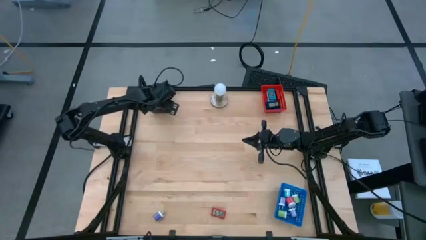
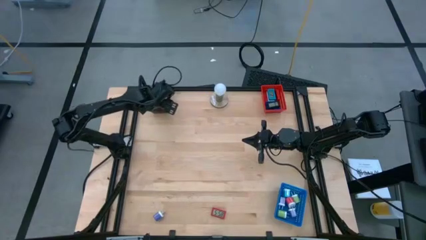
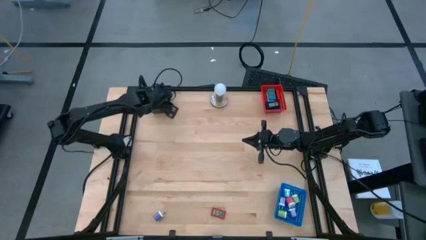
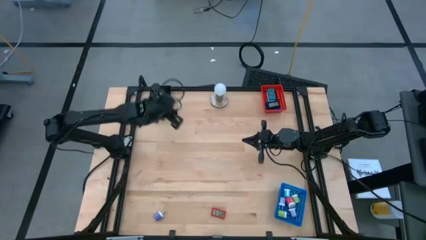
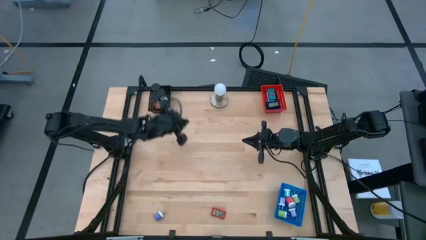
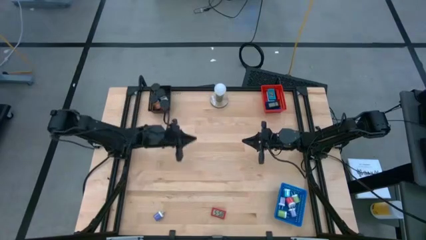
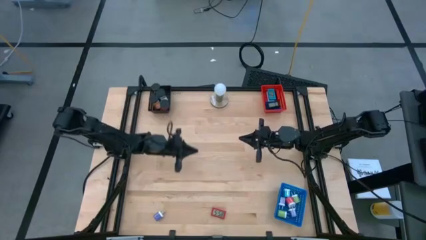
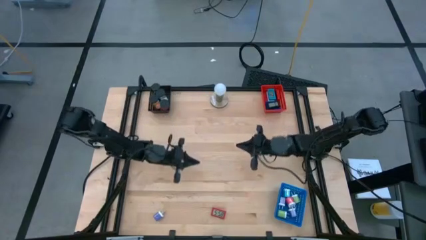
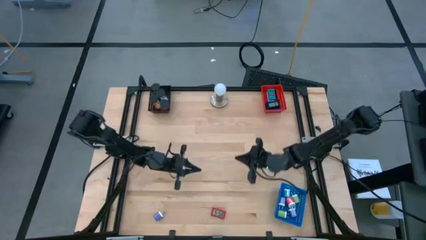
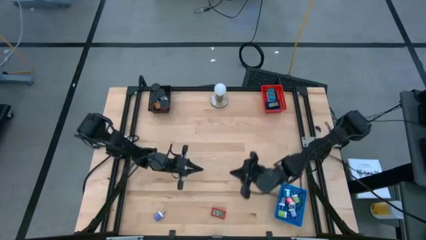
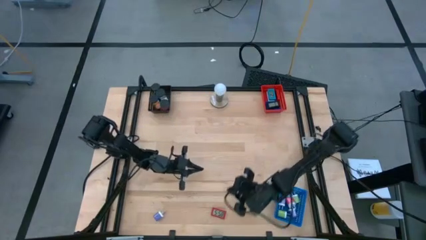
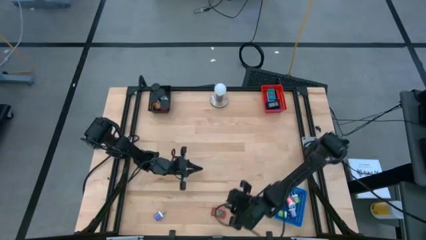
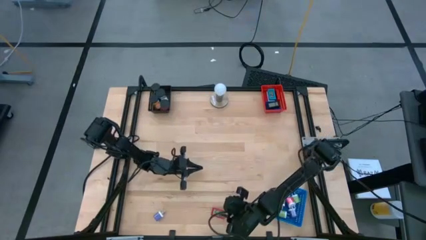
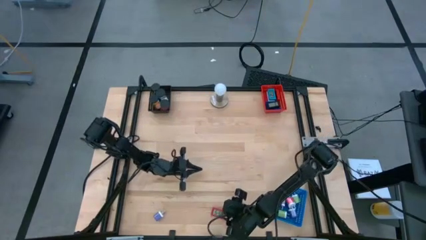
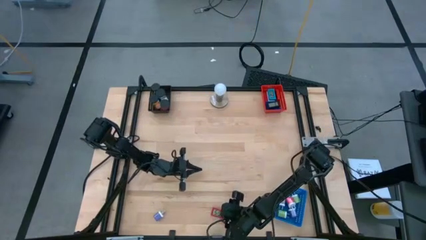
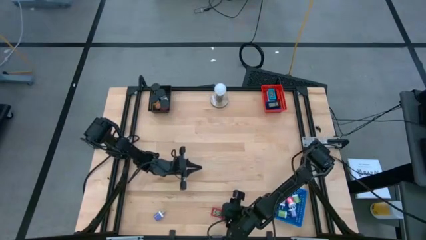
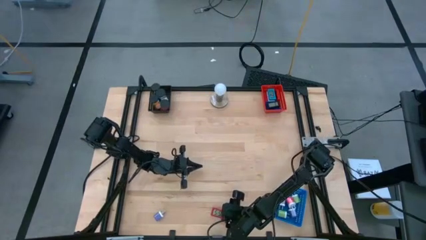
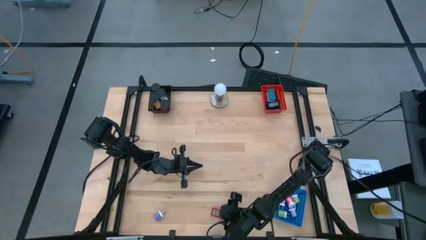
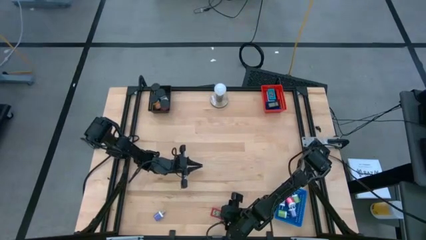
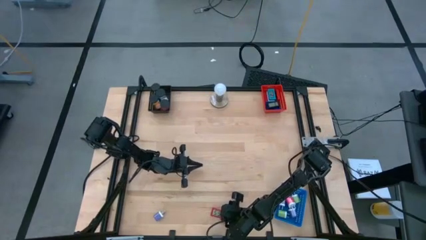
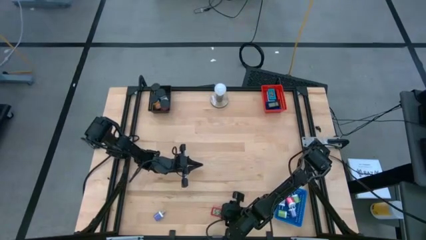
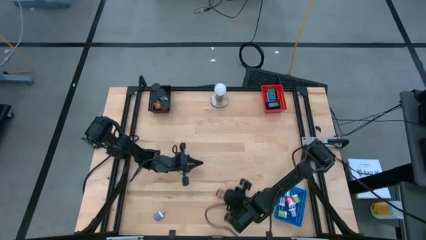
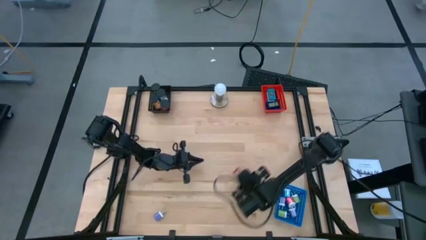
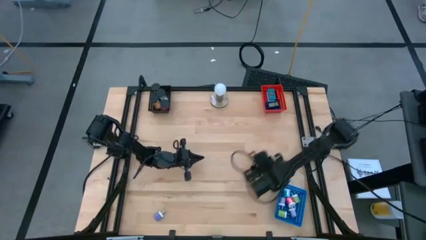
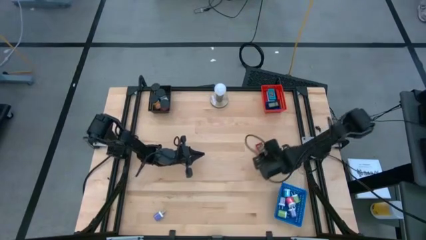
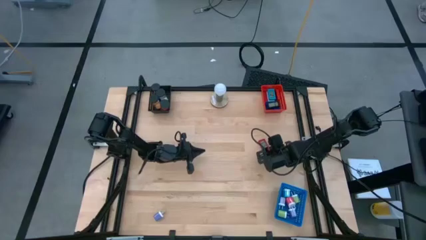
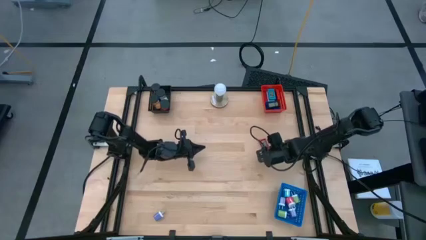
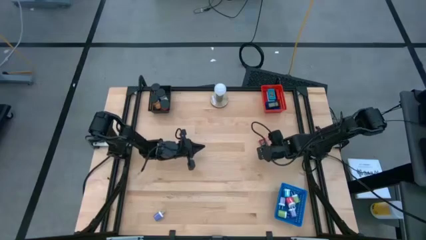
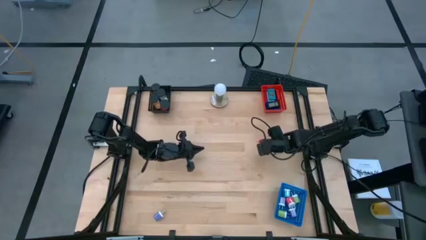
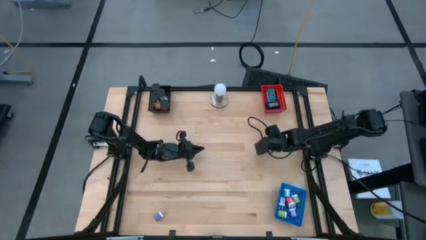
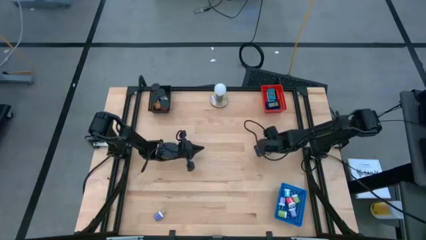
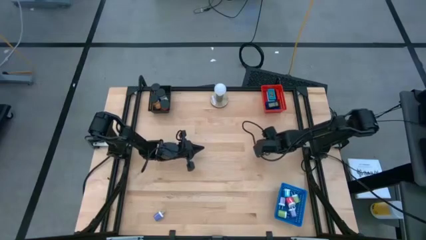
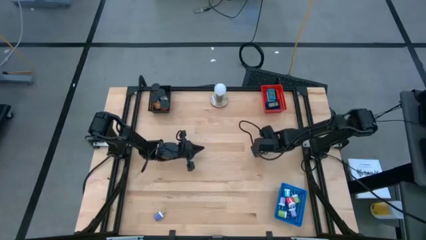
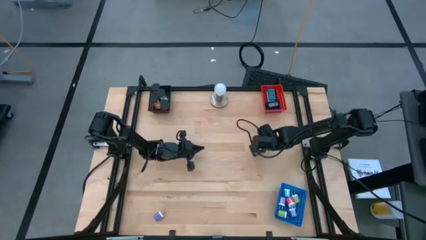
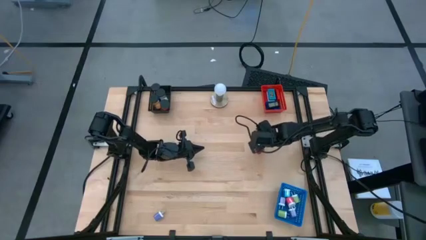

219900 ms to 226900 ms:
Task: Pick & Place Office items
Put the red digital clock into the red bin

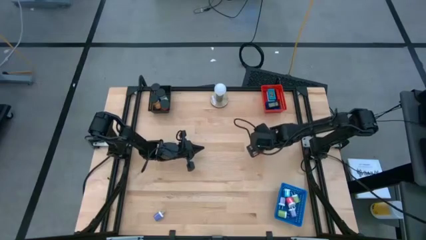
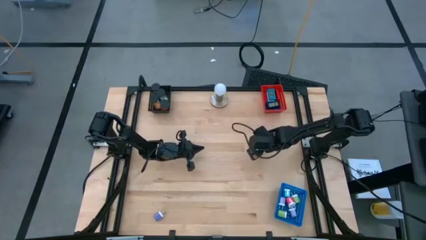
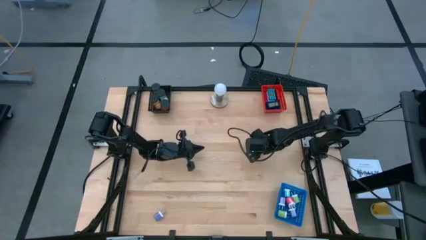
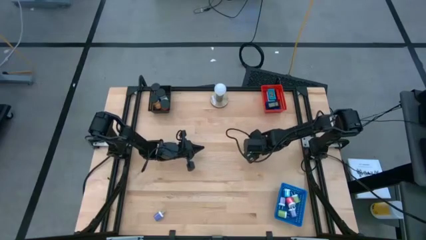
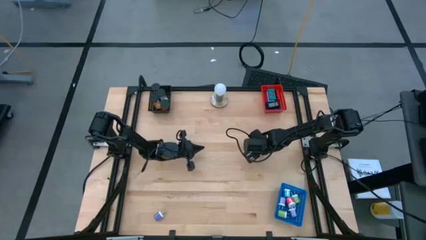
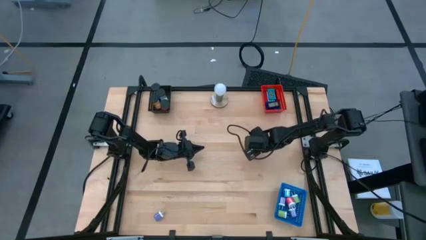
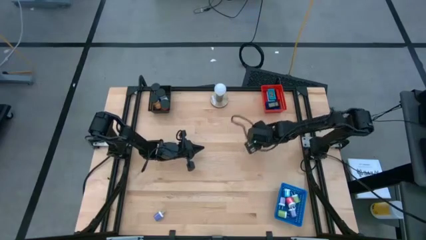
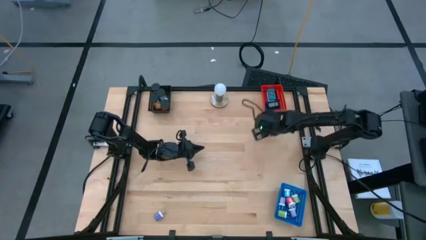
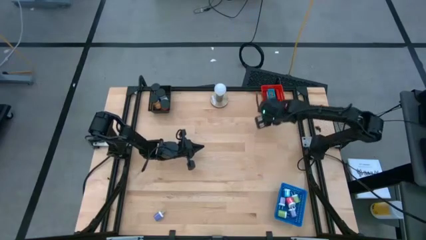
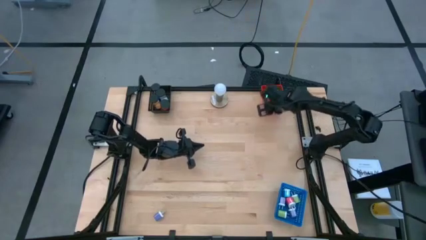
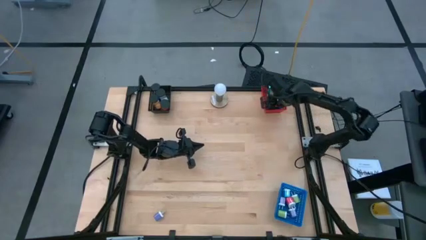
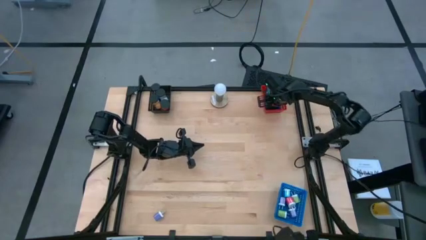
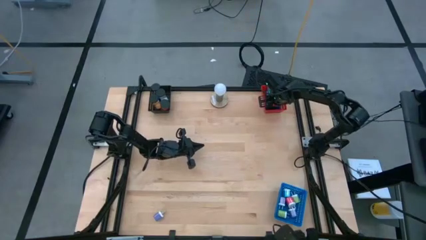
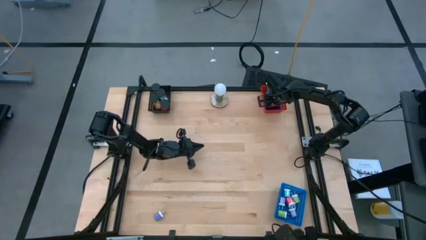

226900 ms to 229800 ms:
Put the red digital clock in the red bin

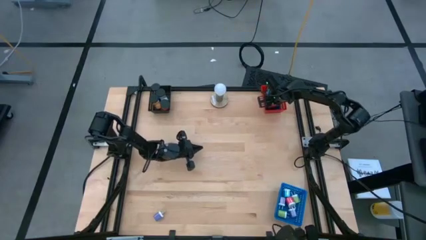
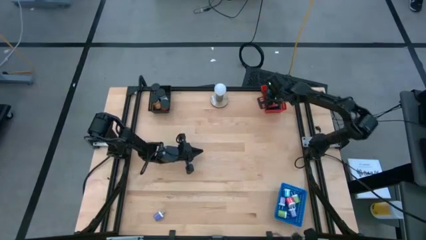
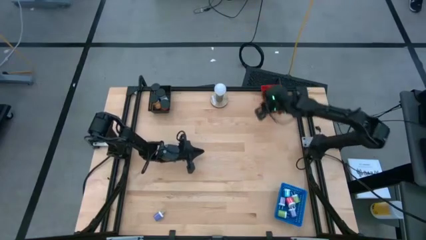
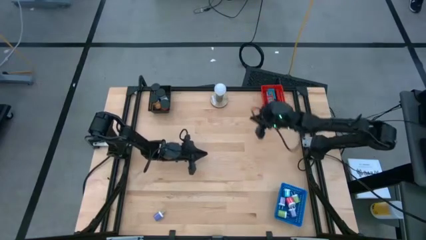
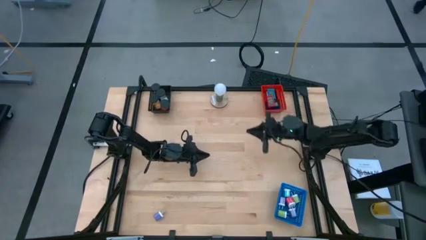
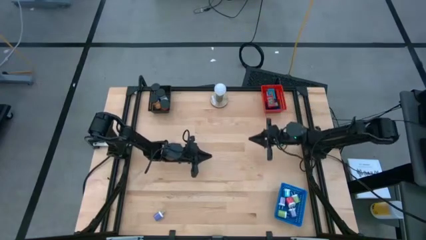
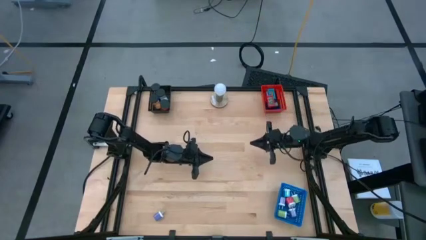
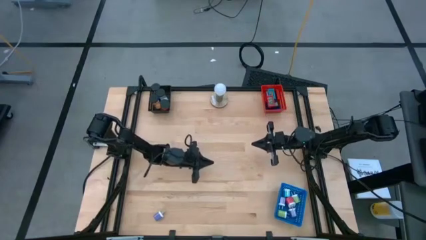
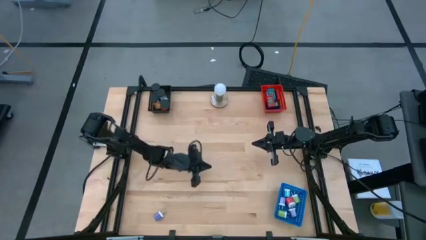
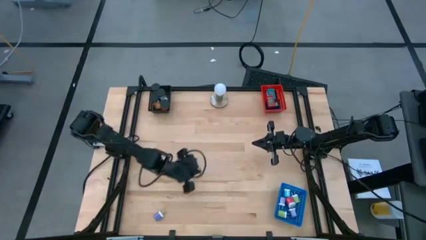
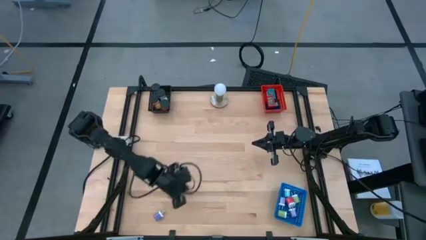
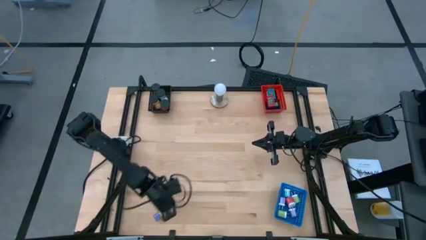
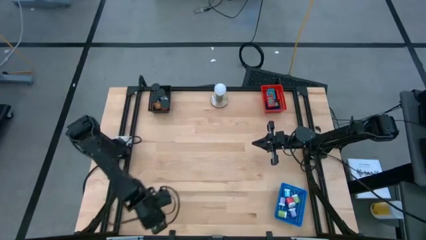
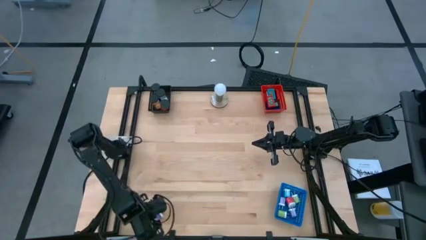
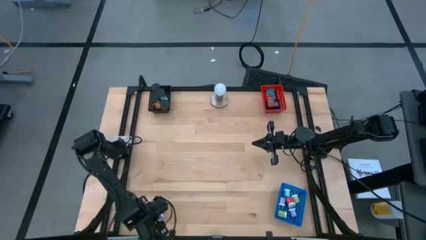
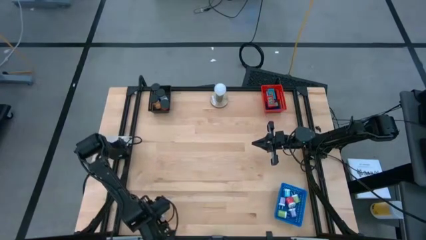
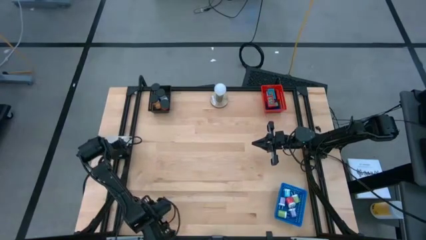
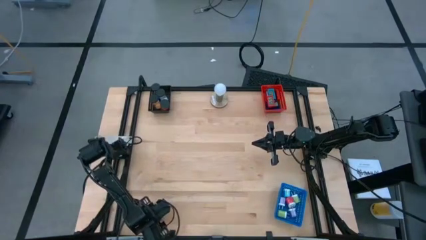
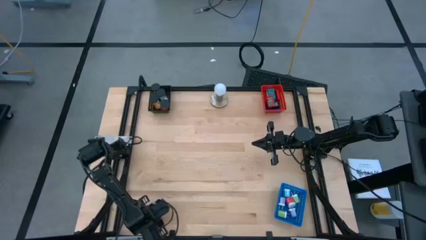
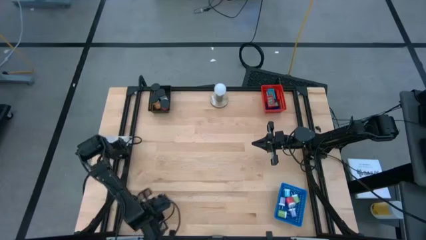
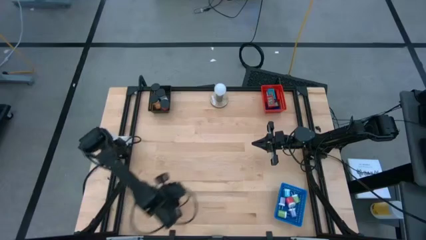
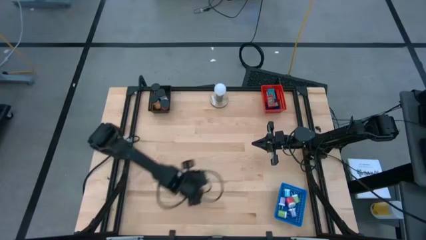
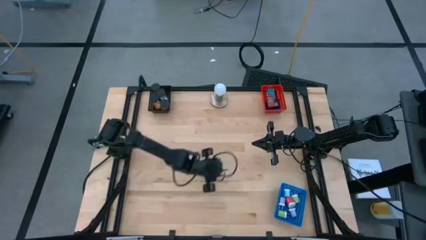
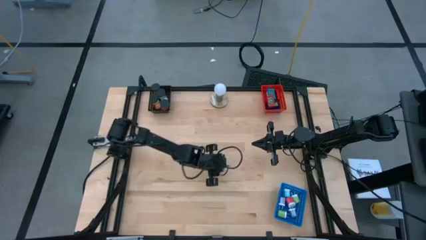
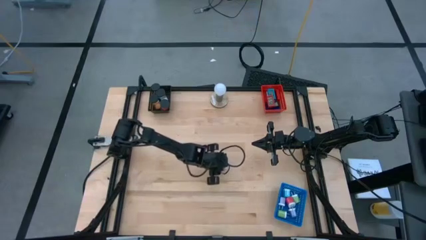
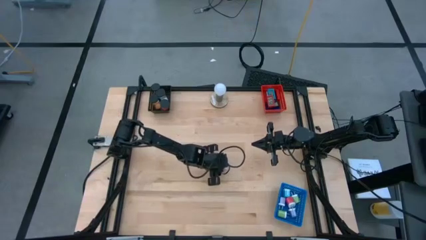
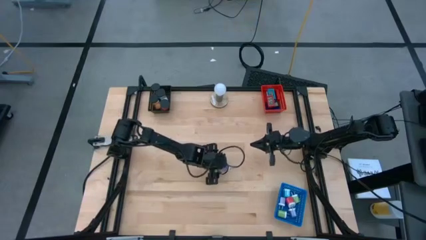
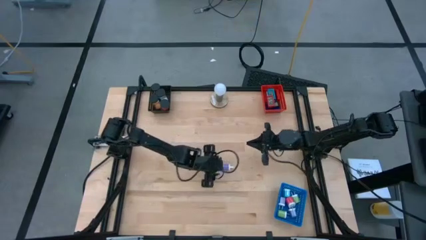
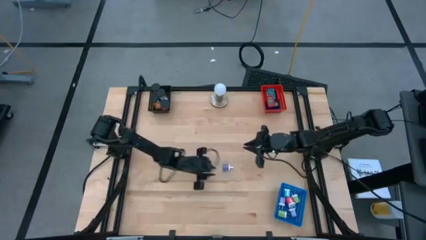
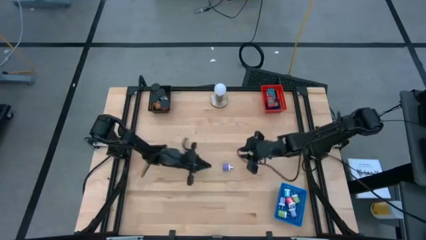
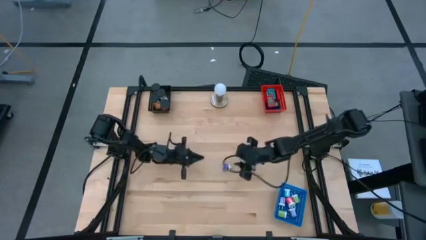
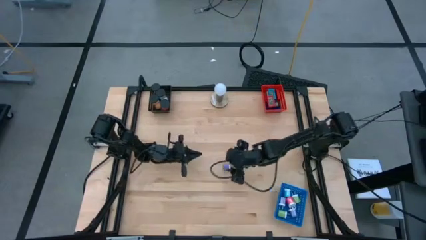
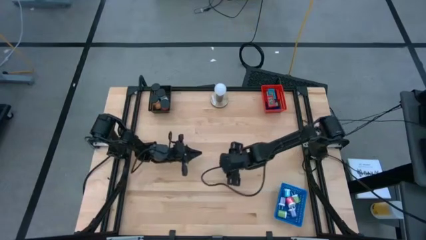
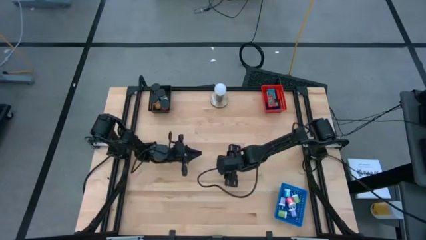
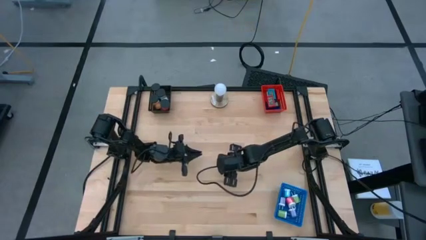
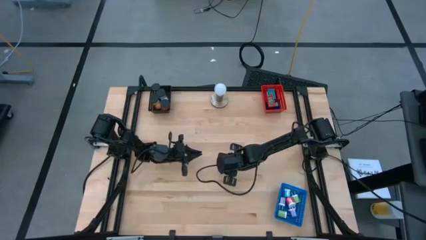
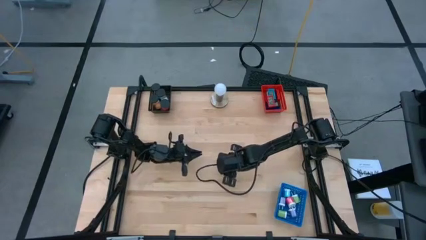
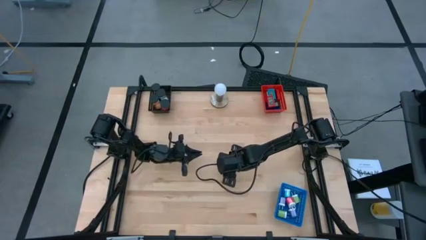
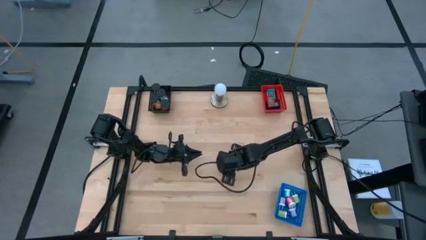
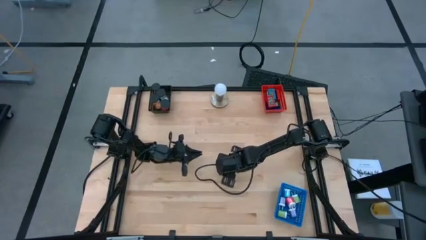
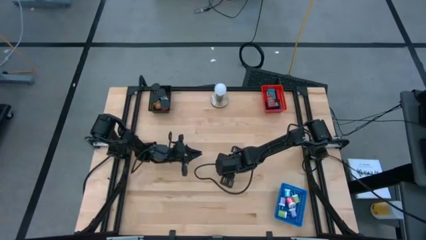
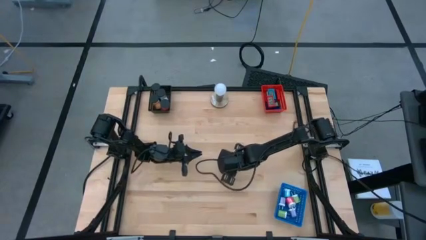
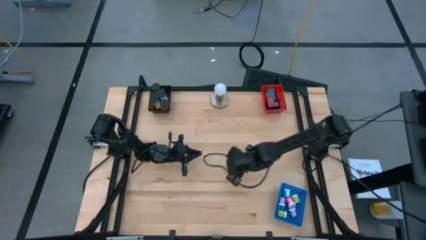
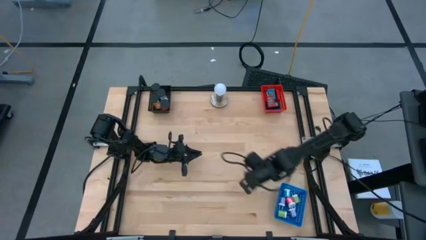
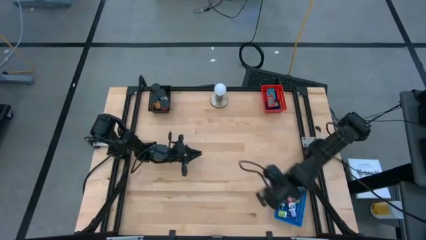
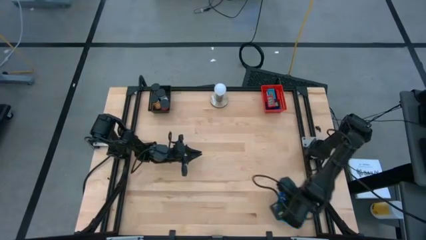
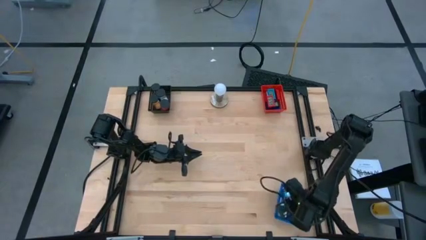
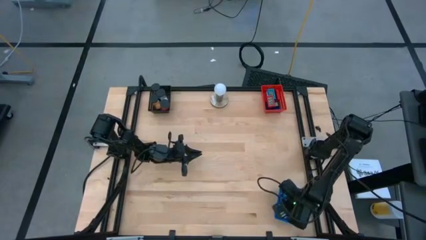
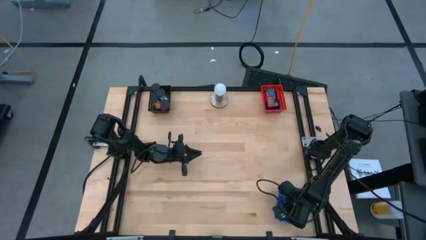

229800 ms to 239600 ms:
Put the violet charger adapter into the blue bin
